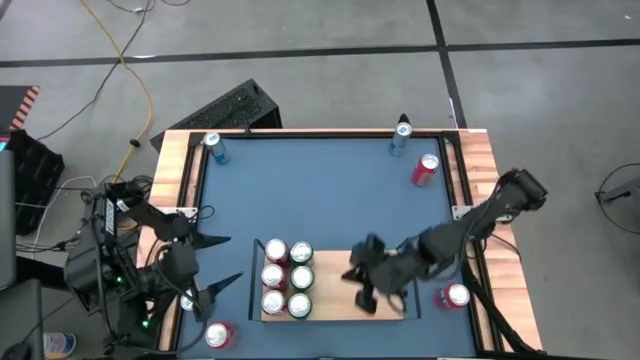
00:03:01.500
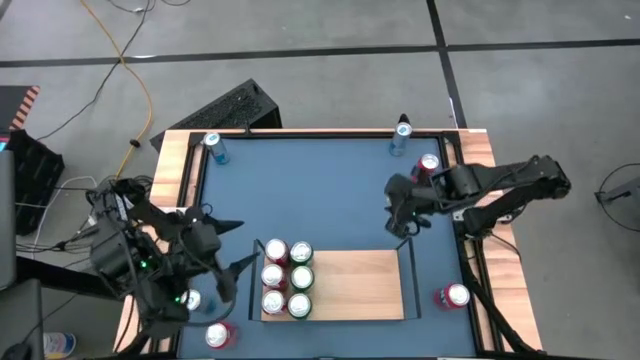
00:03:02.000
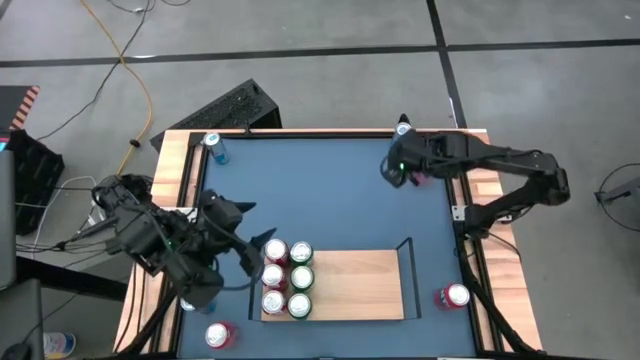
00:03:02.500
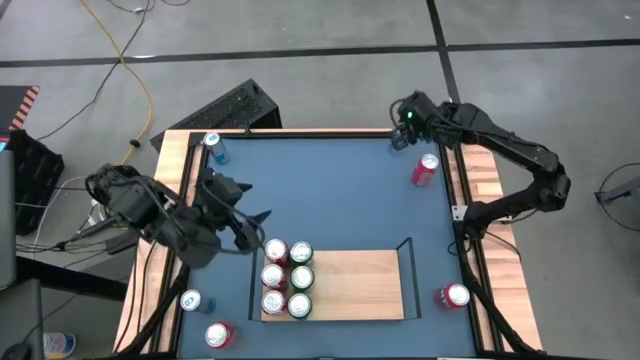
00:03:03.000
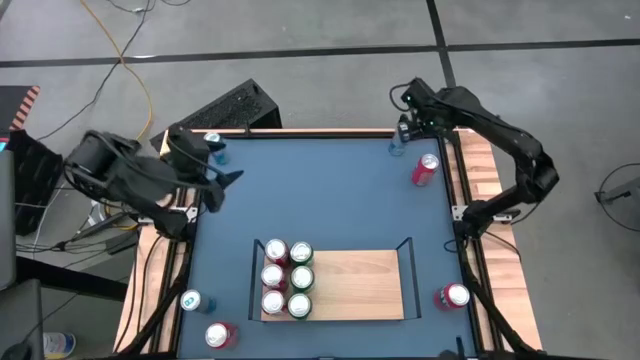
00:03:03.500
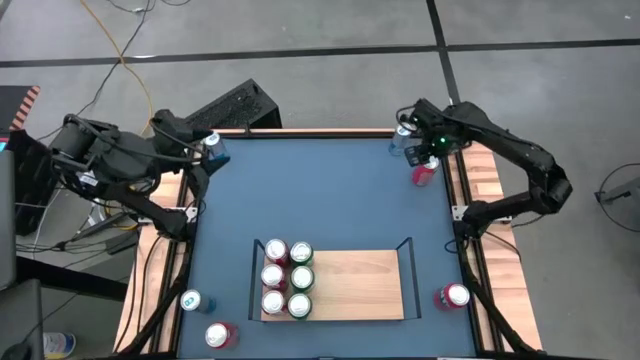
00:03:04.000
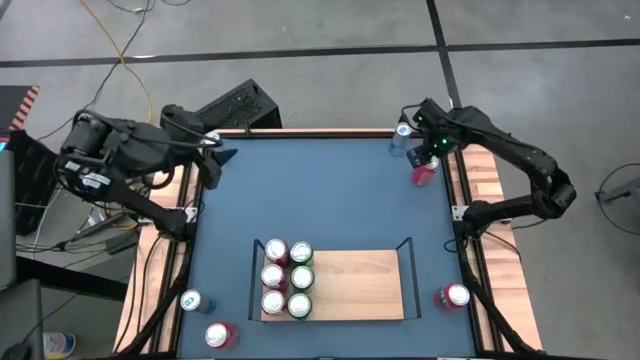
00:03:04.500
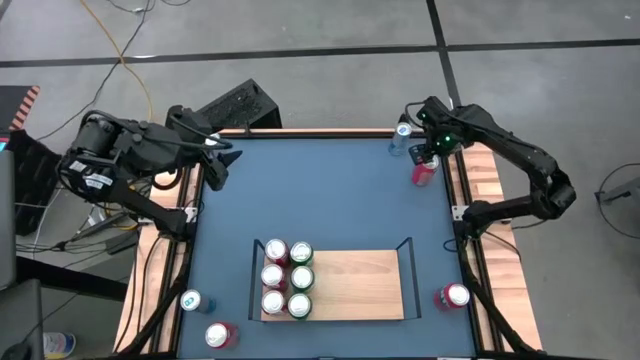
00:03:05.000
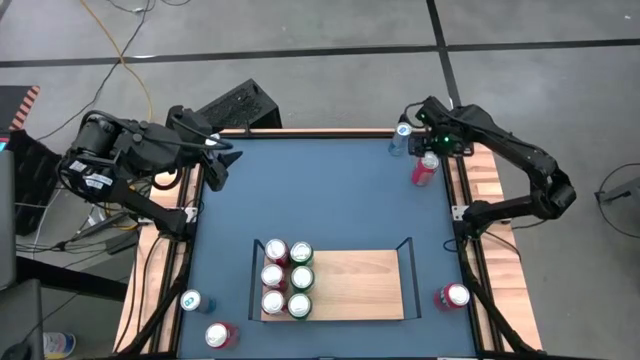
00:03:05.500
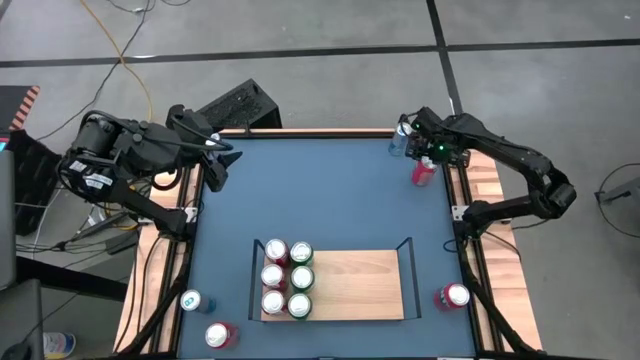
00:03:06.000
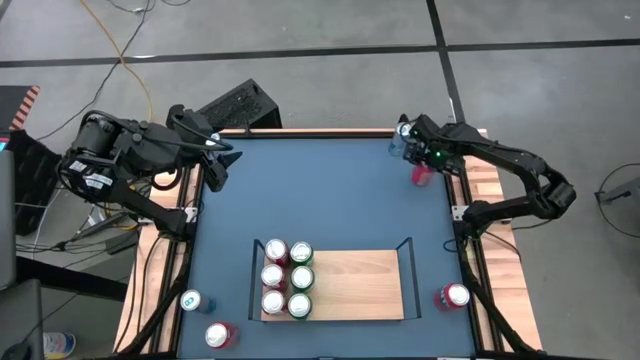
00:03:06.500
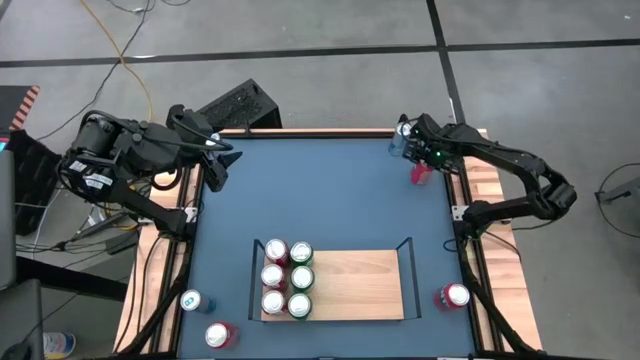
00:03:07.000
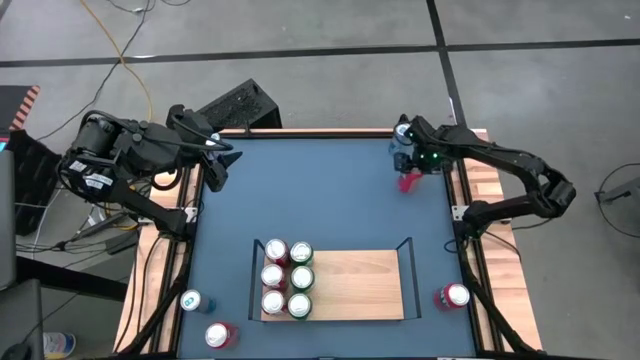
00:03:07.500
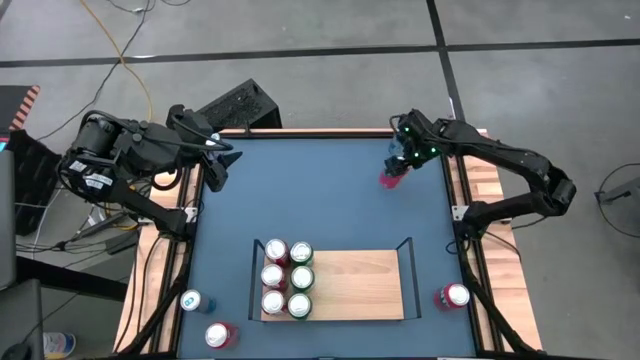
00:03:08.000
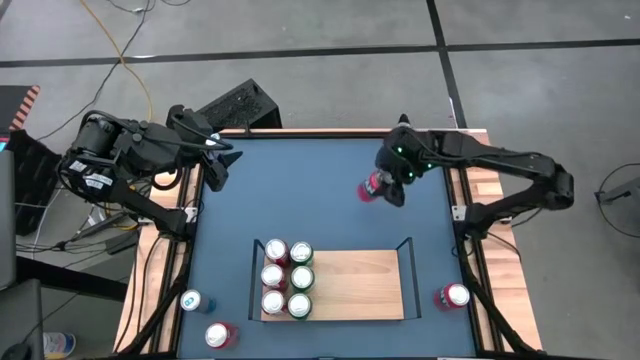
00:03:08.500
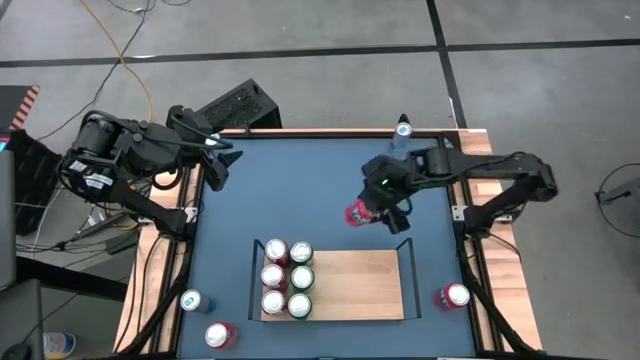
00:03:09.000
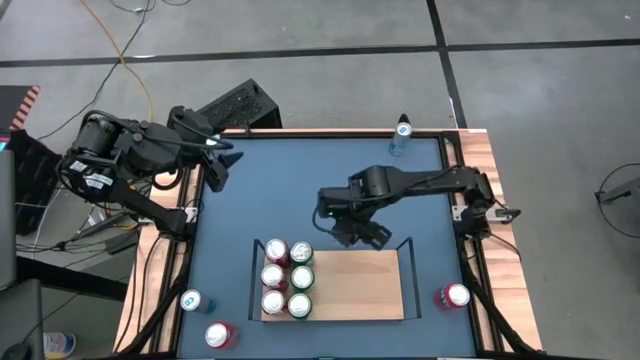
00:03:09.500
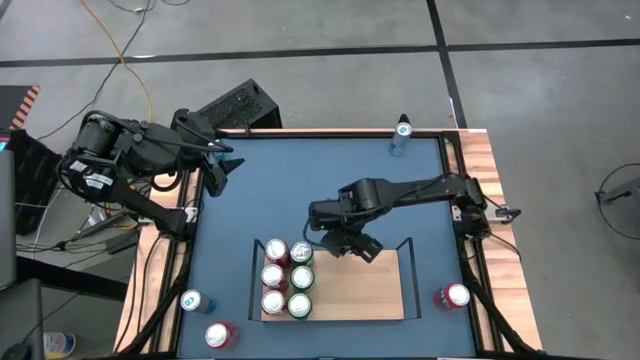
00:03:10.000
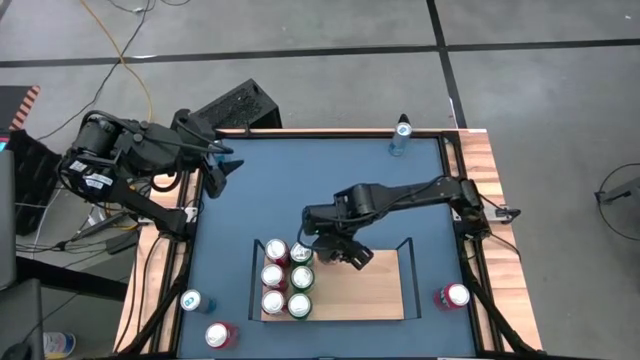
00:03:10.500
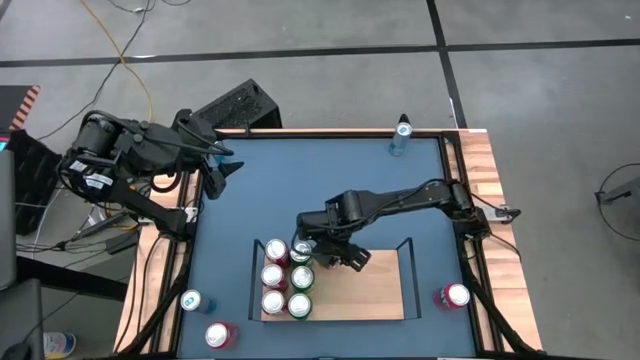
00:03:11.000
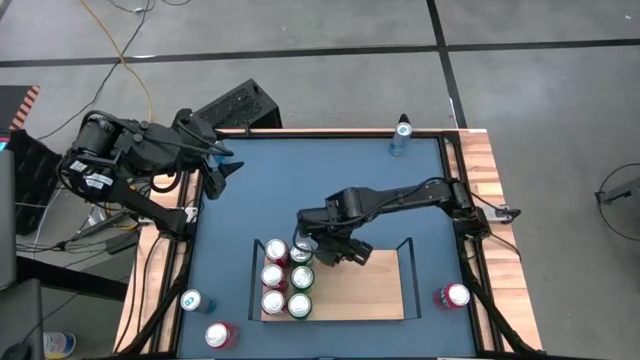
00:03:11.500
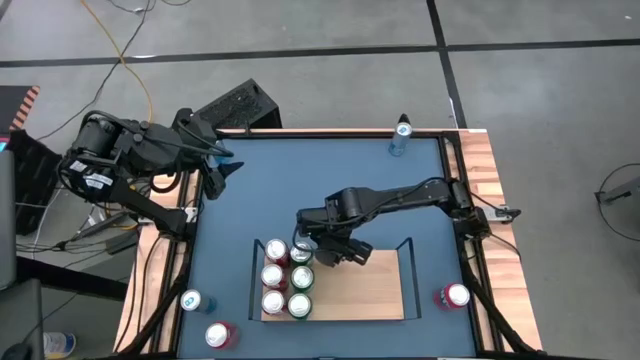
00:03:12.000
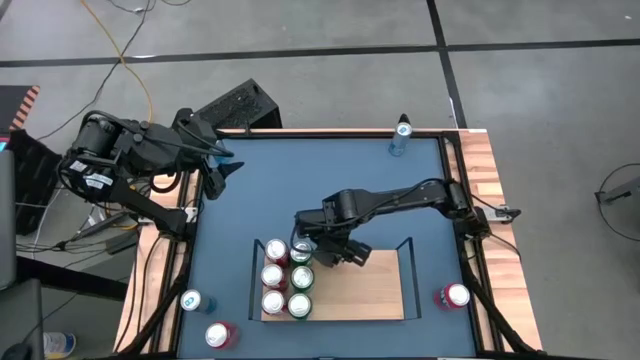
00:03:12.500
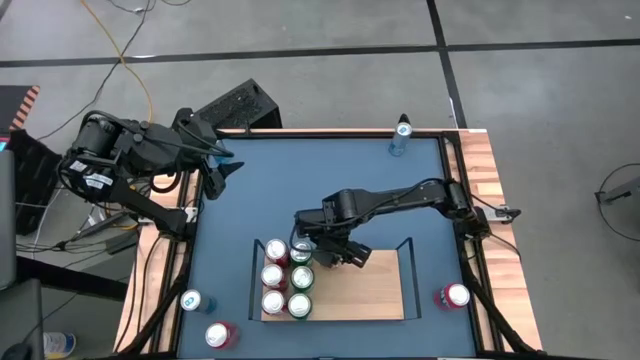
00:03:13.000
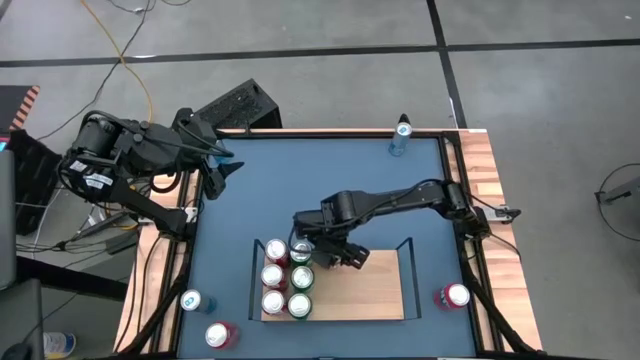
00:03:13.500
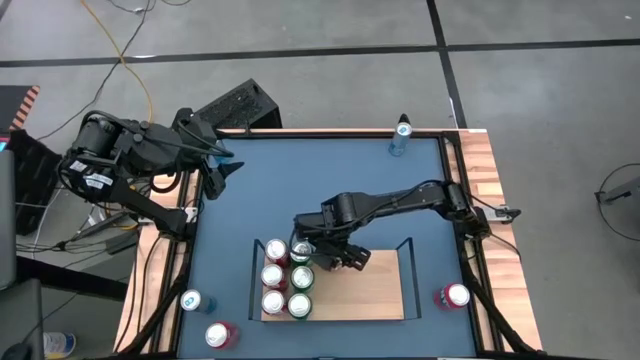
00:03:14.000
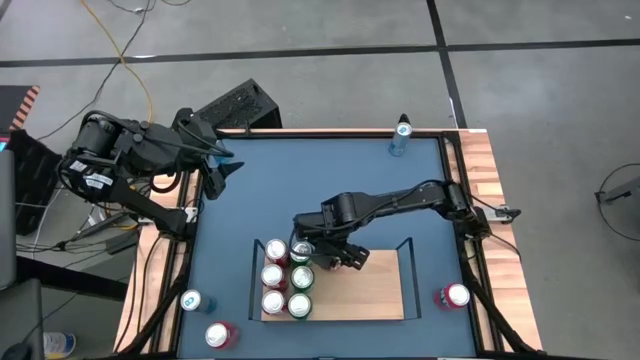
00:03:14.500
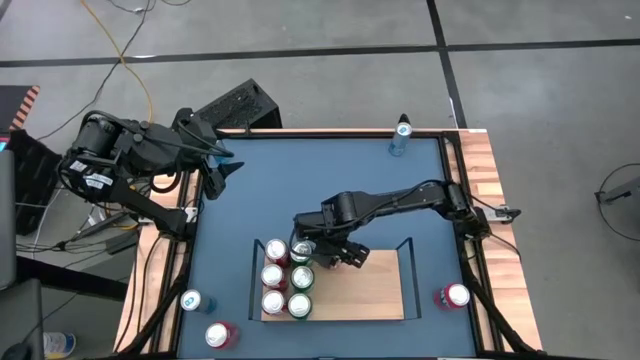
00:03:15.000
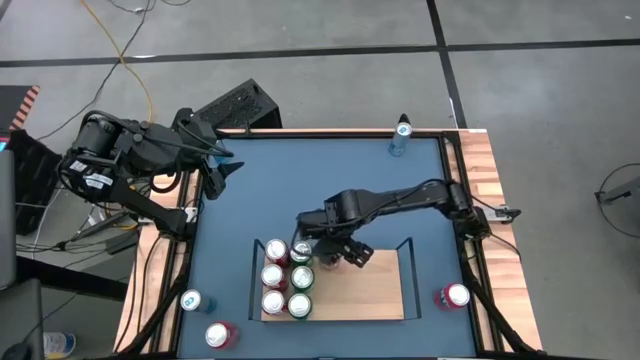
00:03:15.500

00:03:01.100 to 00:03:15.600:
Task: Place canned beverage on shelf
Put the top right orange soda can on the shelf aligned with the other left green soda can

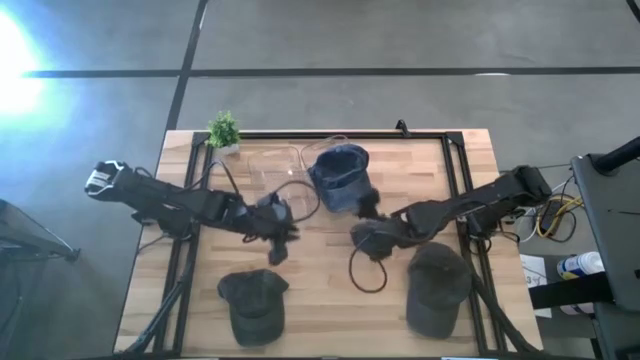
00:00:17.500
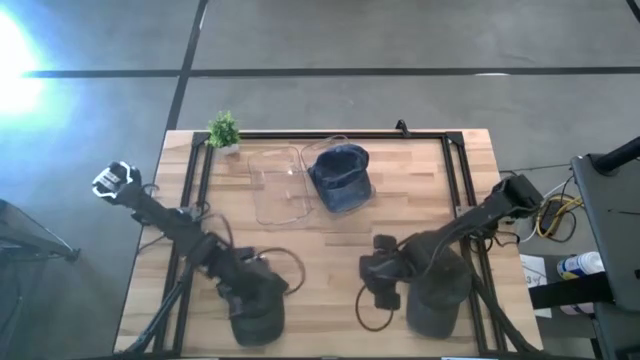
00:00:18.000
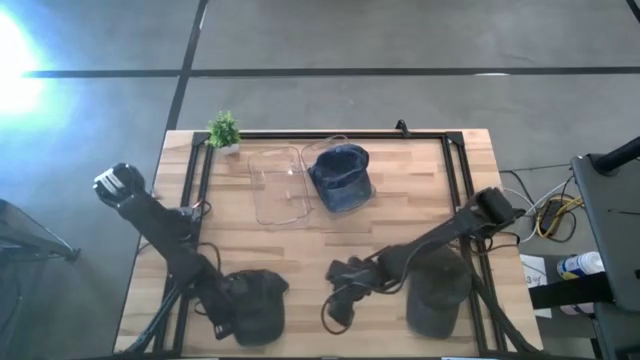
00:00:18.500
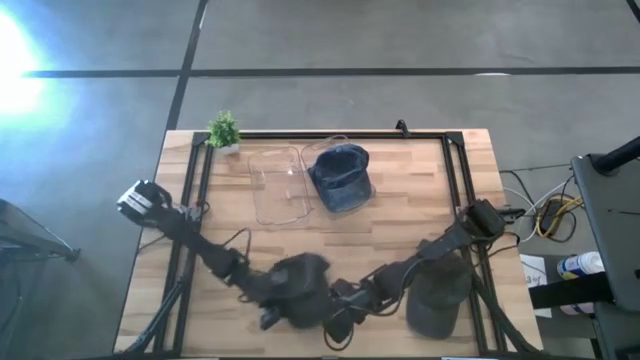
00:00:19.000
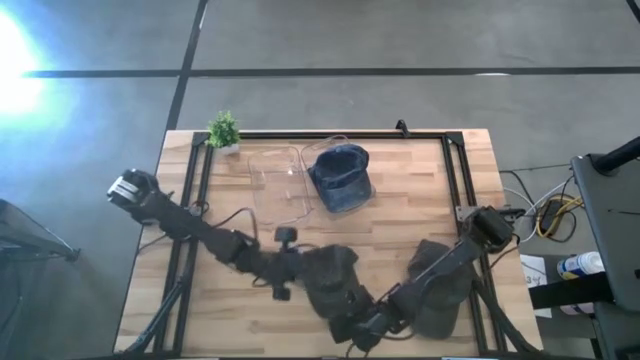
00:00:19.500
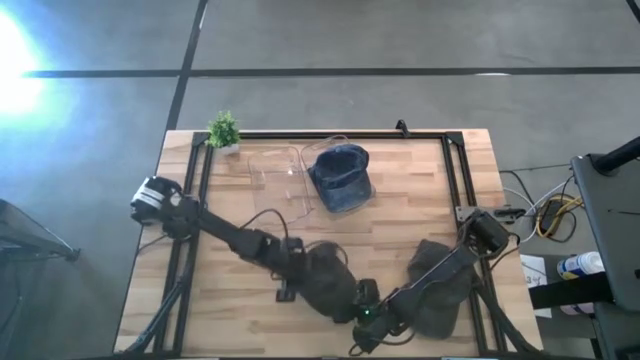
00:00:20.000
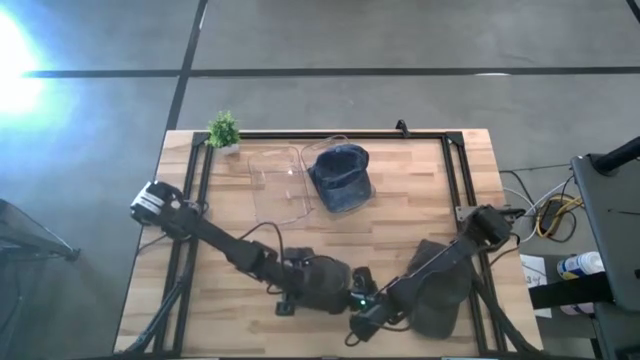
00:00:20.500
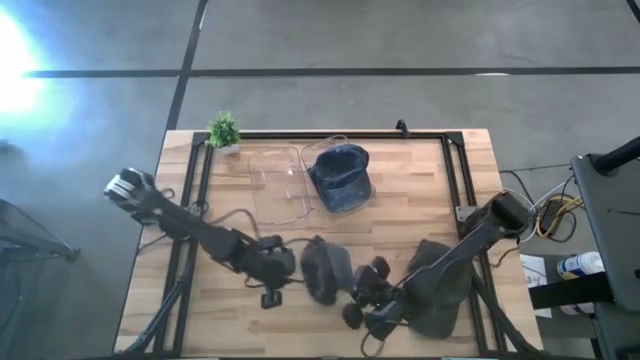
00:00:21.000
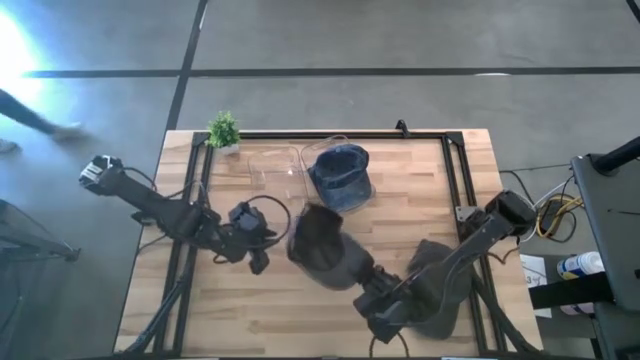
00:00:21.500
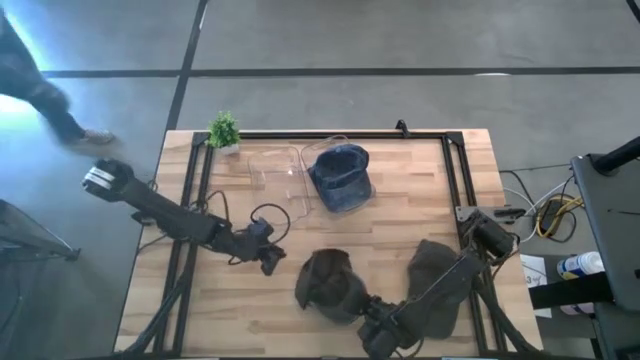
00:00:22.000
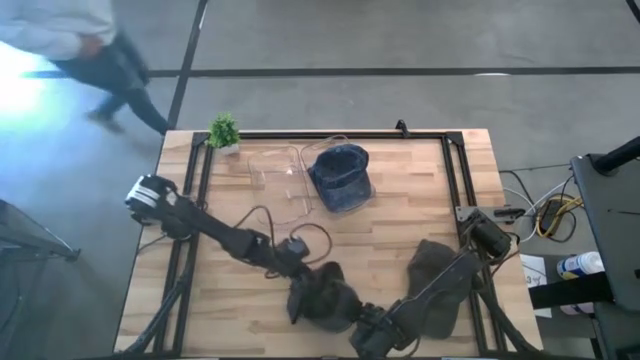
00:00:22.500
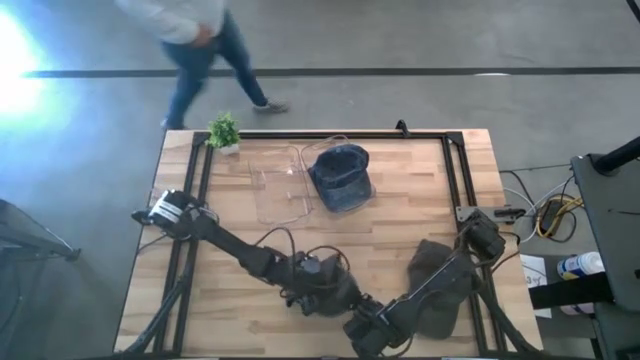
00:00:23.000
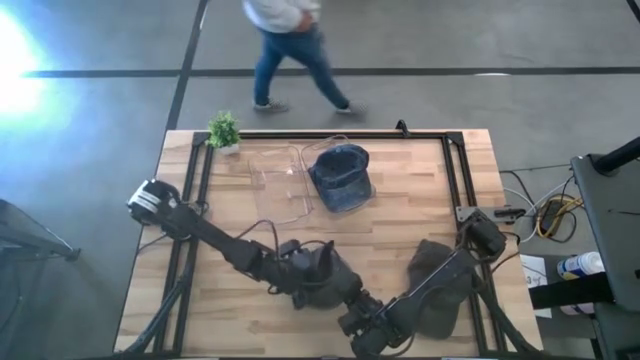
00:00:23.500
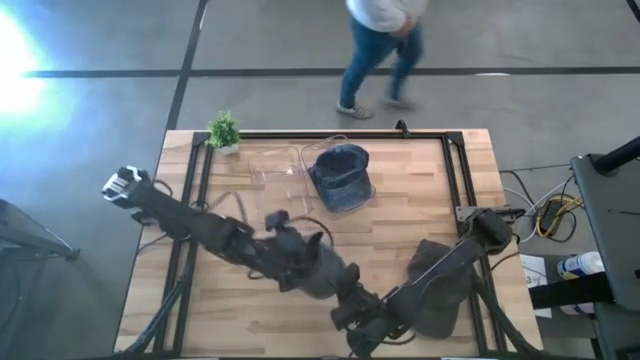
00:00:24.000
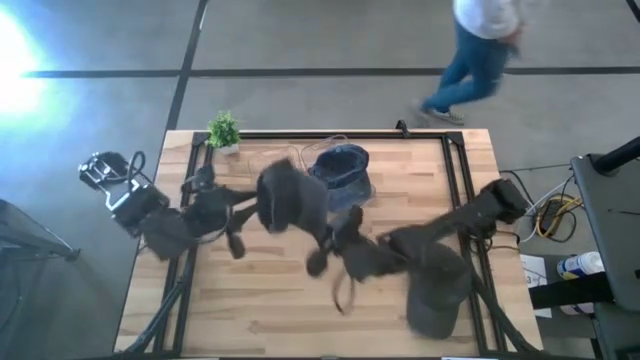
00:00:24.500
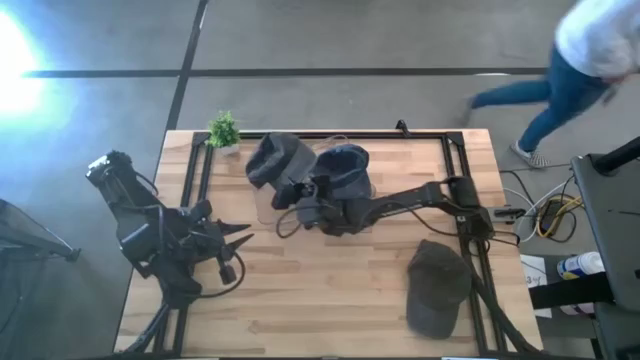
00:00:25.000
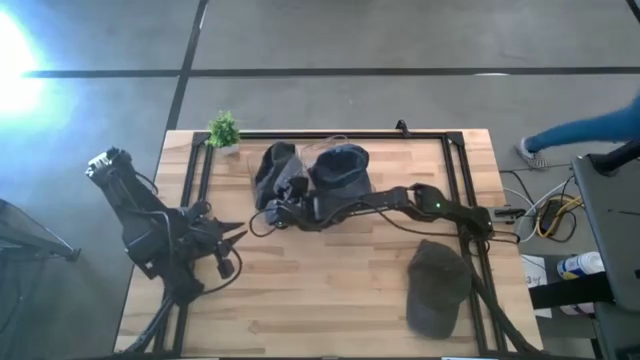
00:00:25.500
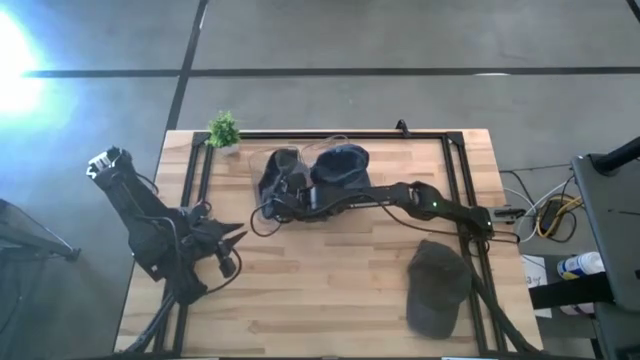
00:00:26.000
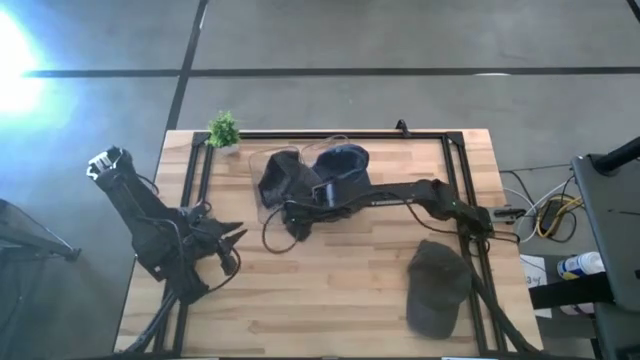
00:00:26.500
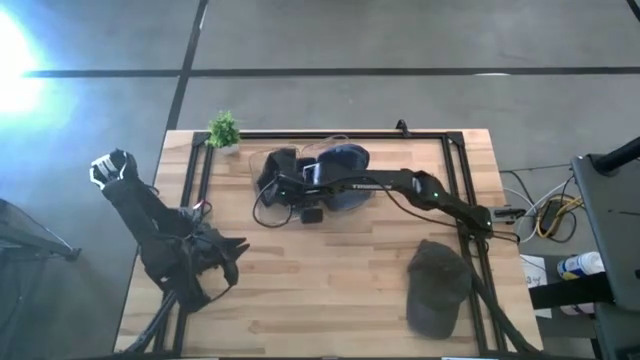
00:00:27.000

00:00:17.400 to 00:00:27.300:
Task: Pick & Place hat
Put the left black cap into the left transparent bin
